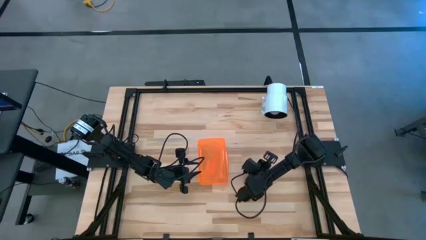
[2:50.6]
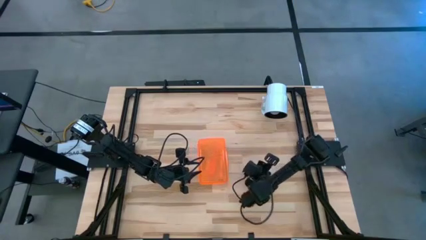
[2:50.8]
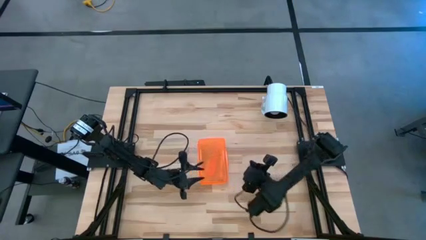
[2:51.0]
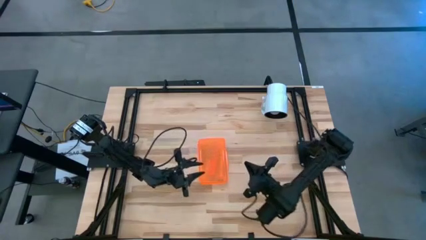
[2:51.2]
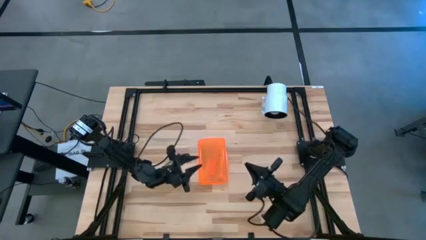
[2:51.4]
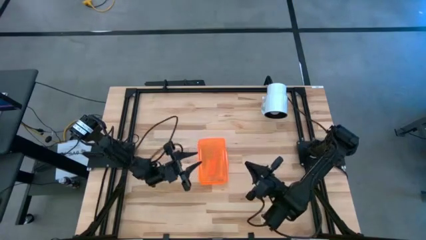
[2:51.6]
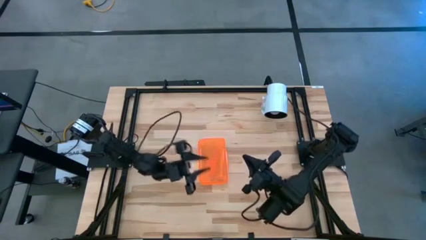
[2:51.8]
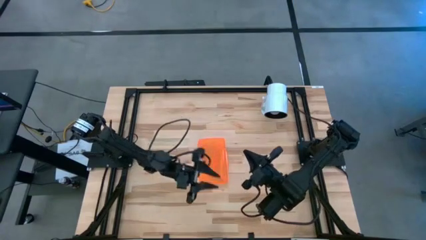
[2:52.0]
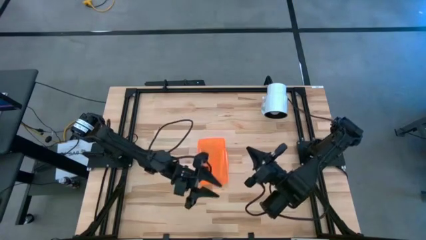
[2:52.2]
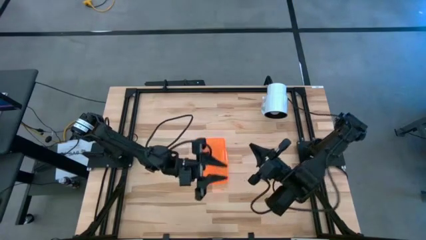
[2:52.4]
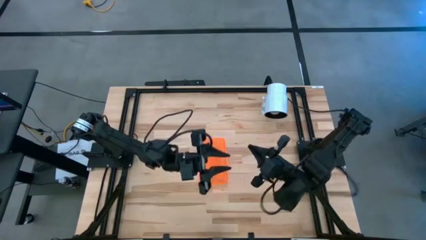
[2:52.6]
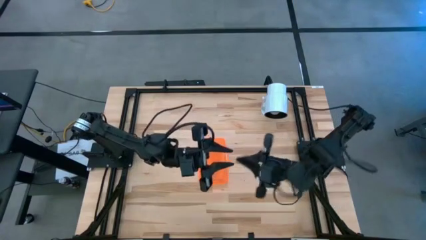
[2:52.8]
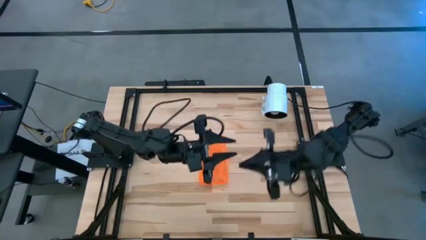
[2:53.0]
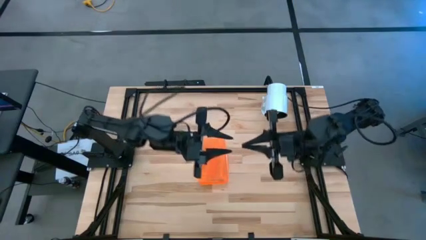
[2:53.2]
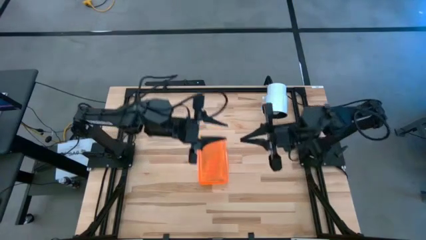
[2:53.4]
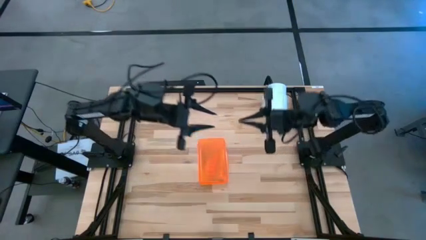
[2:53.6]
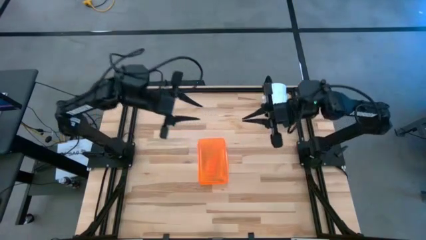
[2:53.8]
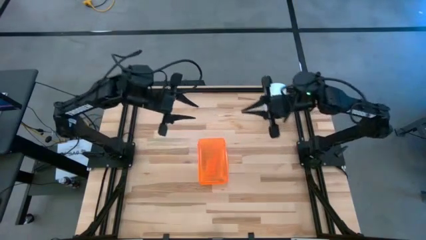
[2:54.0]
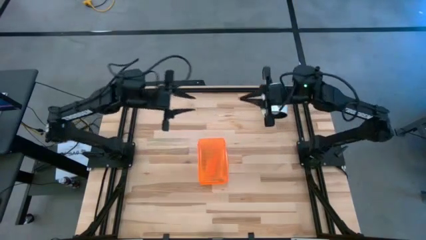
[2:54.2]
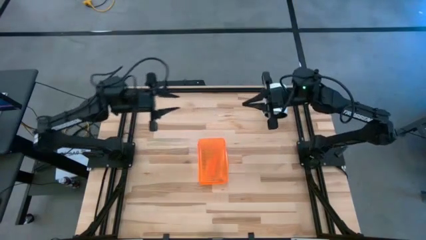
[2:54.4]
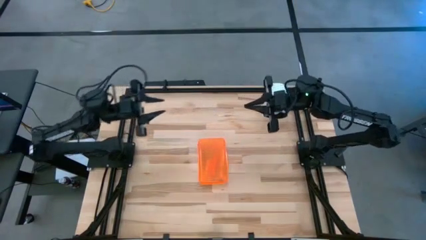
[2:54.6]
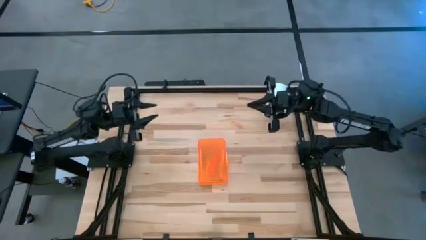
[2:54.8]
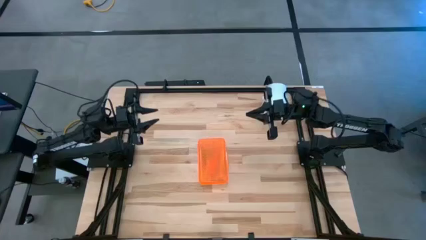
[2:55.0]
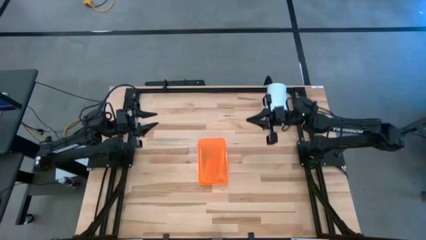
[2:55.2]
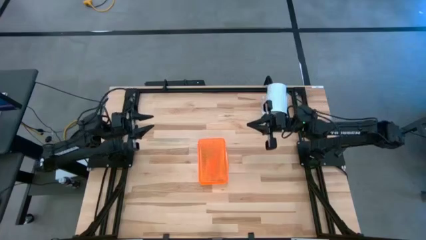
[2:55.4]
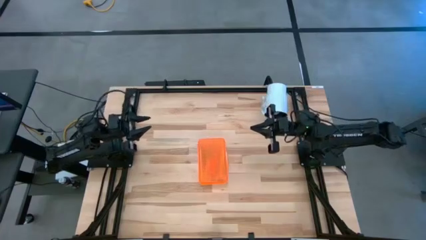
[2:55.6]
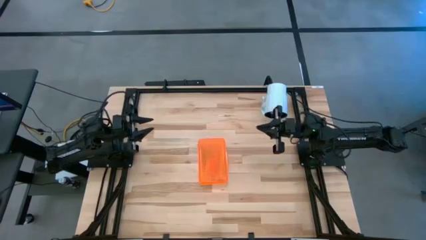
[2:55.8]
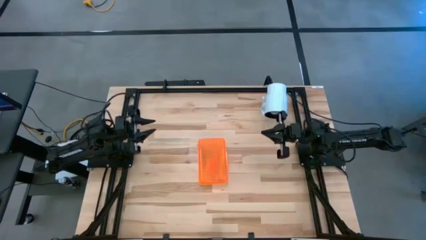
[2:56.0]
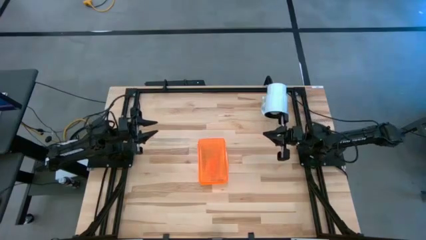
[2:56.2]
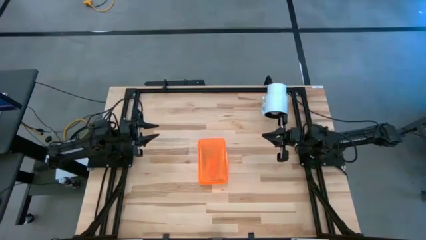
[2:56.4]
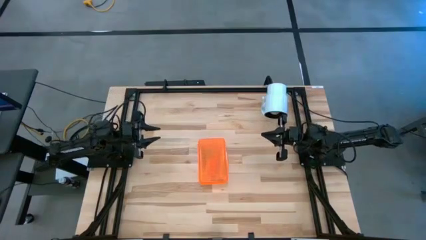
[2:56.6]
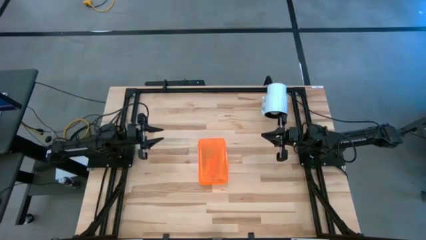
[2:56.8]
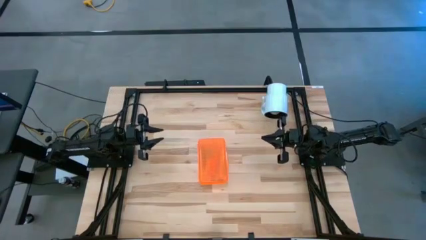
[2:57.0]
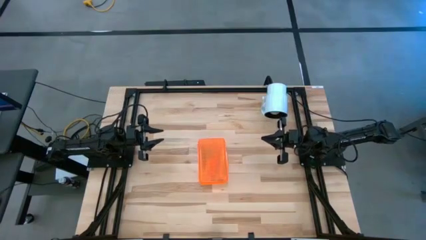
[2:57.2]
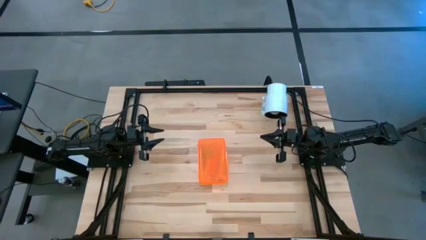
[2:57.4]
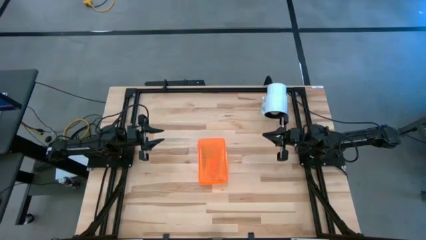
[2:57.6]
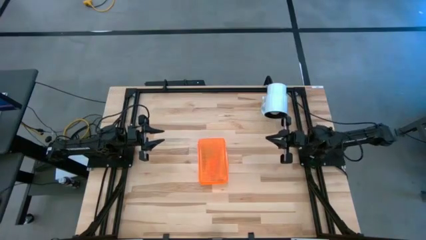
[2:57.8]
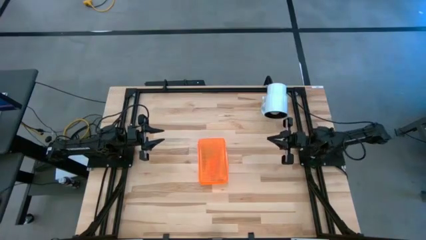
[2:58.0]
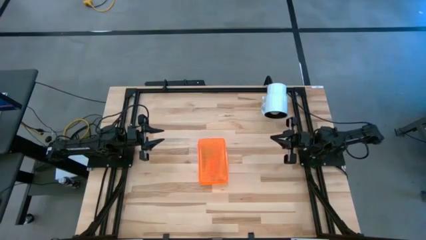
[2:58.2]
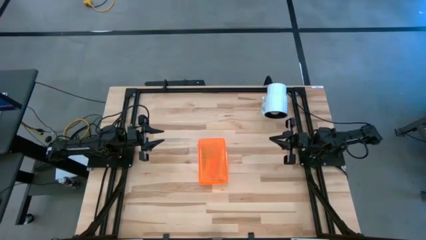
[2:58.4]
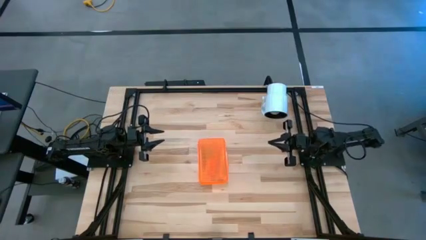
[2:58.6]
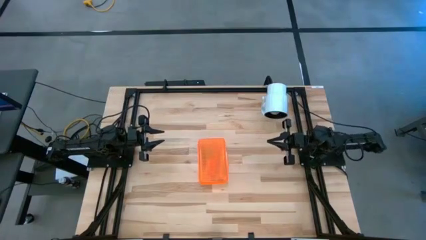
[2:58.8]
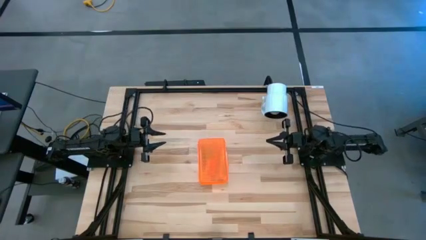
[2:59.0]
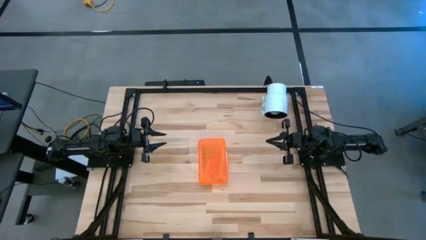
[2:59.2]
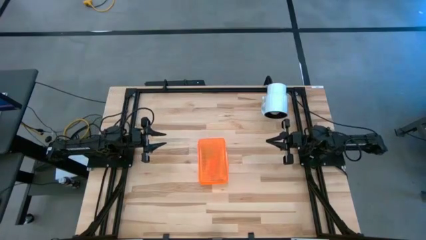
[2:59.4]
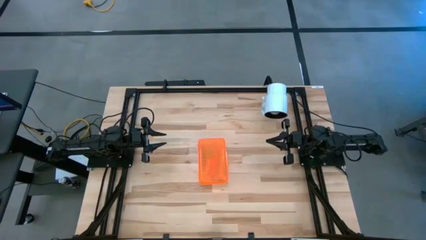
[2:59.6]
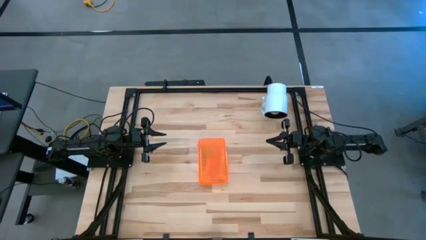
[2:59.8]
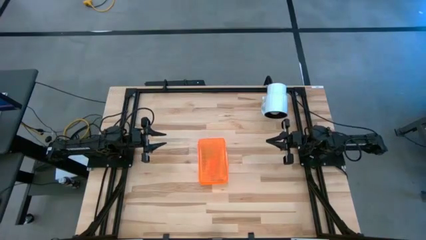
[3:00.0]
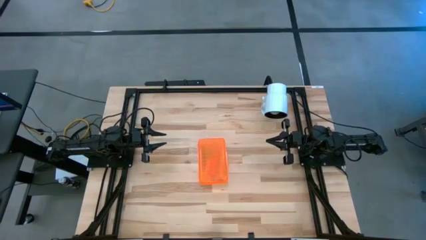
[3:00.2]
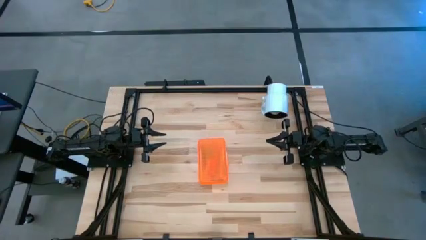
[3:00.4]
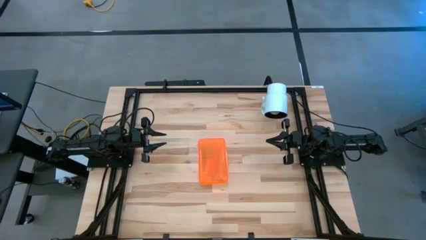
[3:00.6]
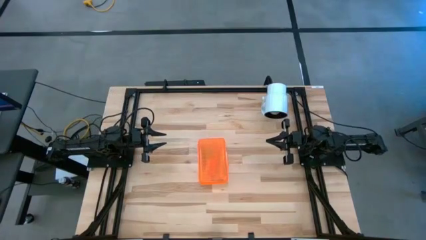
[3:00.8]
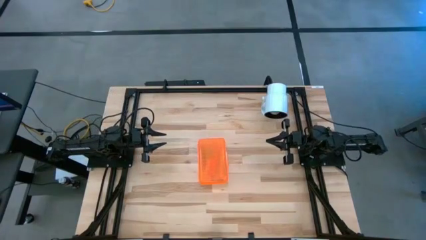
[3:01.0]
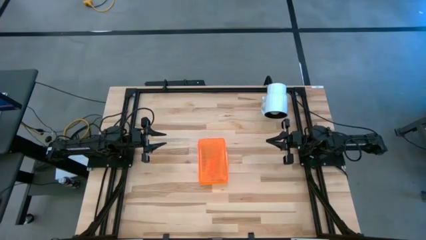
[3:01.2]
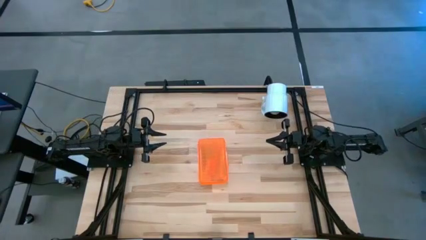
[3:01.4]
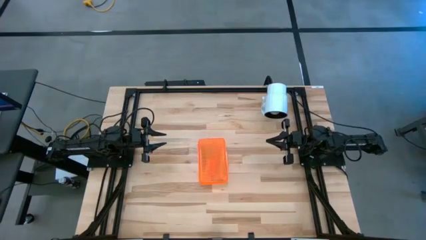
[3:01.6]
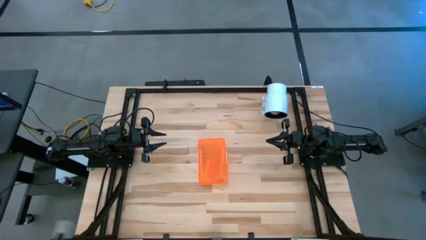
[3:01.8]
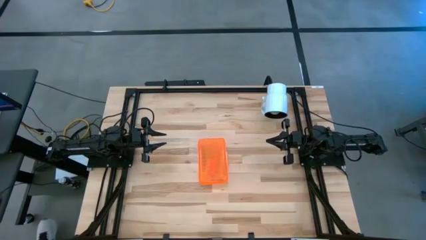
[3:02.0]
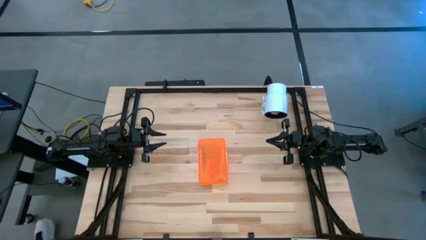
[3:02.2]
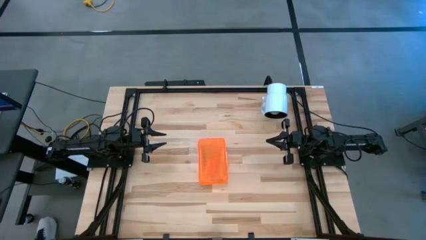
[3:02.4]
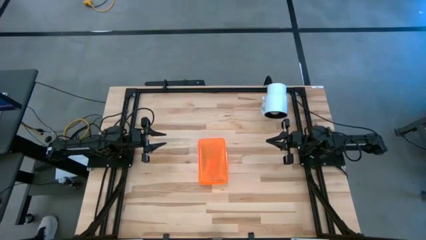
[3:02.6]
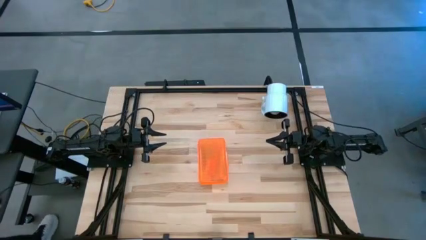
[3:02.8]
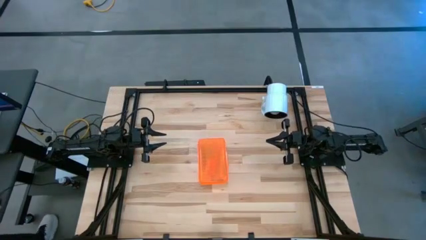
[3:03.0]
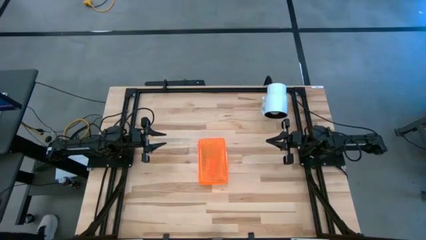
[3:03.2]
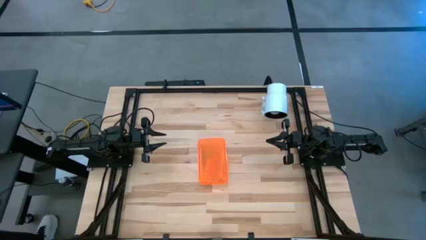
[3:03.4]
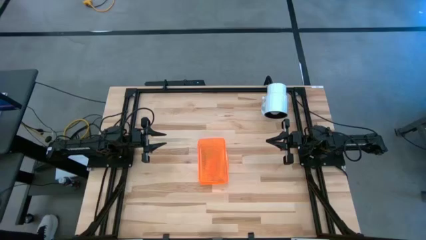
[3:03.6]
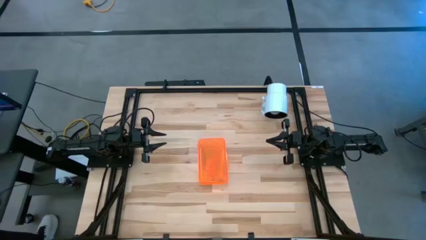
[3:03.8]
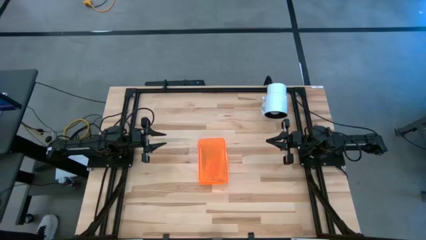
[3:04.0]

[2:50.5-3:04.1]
Task: Pick & place school supplies into a supply box
Return to Home Position

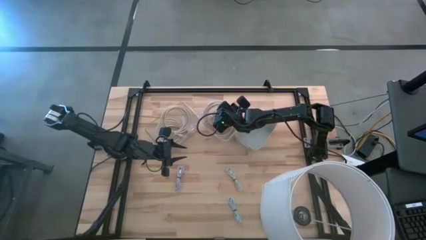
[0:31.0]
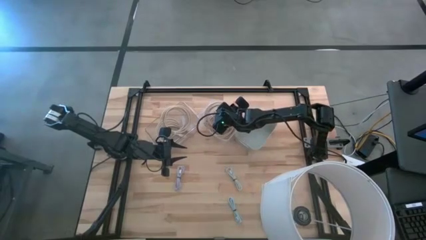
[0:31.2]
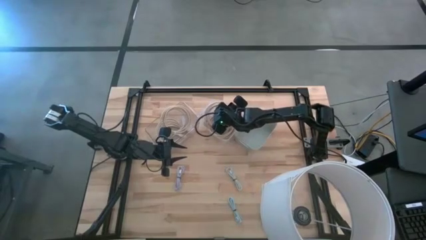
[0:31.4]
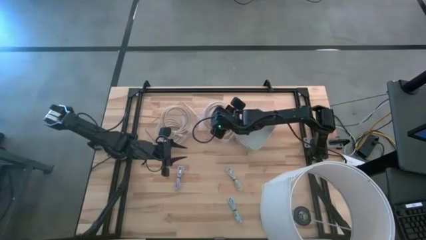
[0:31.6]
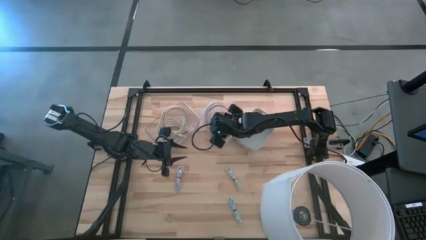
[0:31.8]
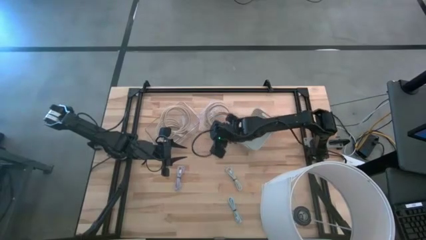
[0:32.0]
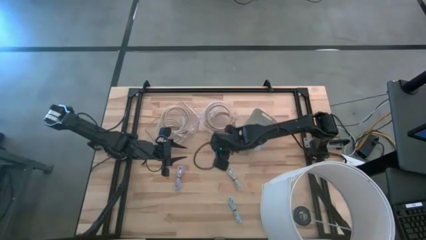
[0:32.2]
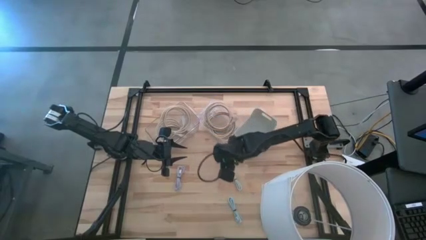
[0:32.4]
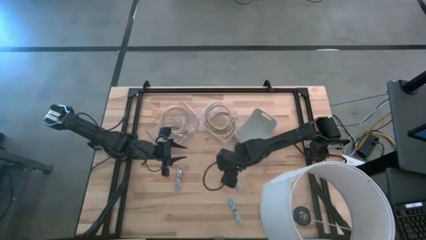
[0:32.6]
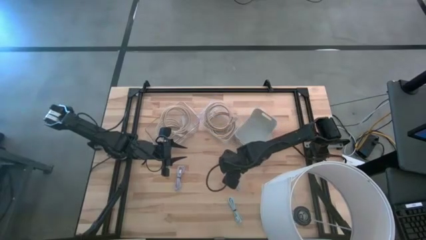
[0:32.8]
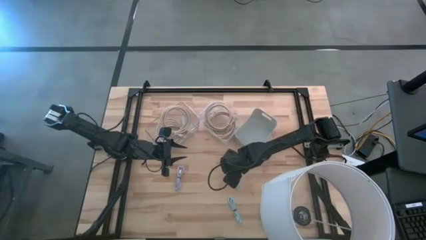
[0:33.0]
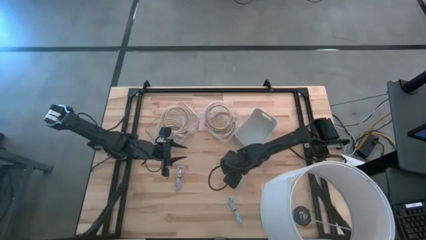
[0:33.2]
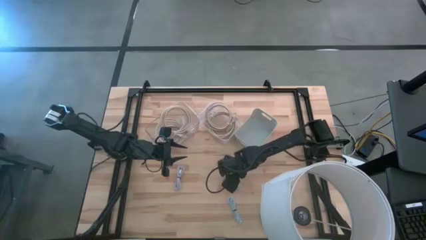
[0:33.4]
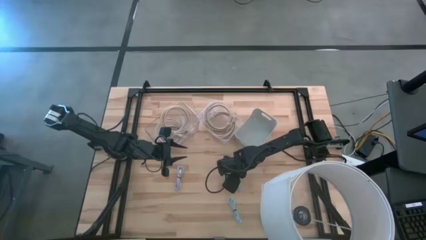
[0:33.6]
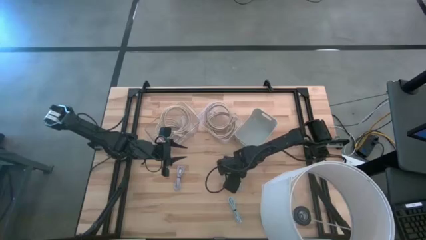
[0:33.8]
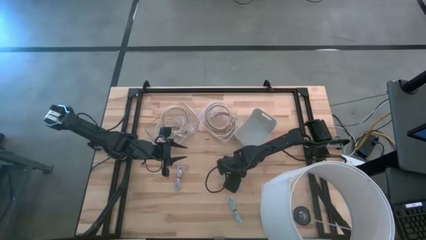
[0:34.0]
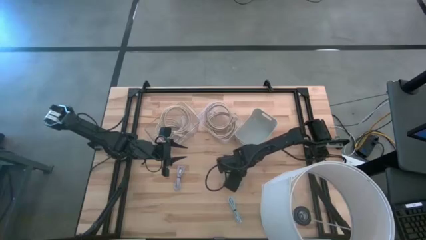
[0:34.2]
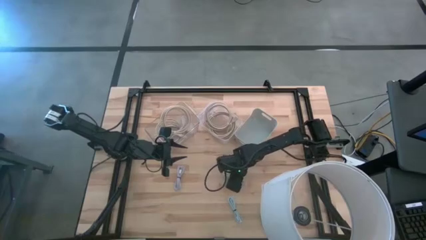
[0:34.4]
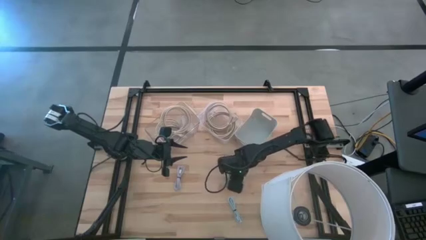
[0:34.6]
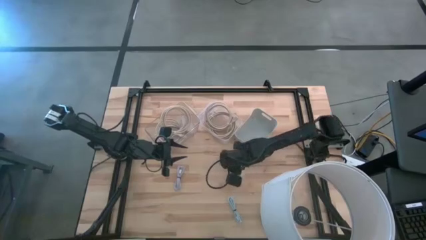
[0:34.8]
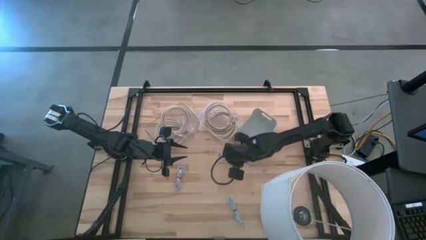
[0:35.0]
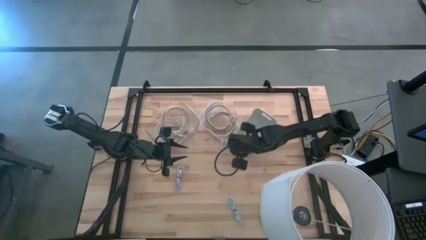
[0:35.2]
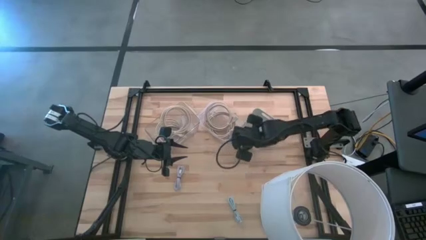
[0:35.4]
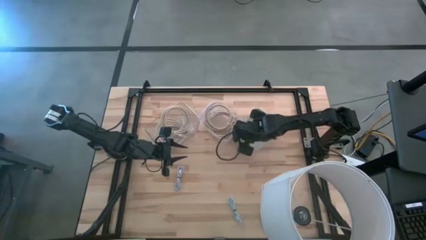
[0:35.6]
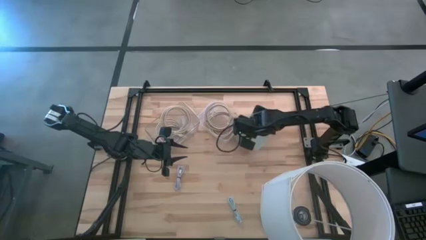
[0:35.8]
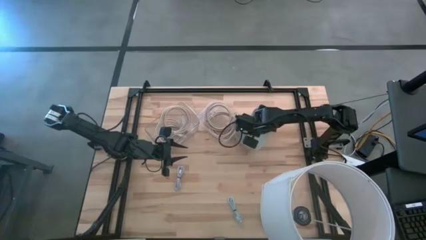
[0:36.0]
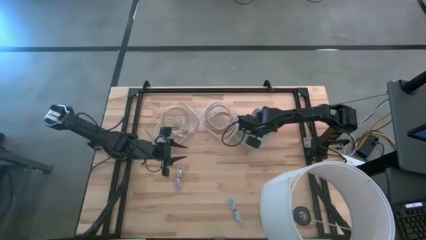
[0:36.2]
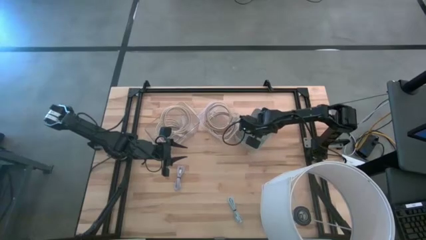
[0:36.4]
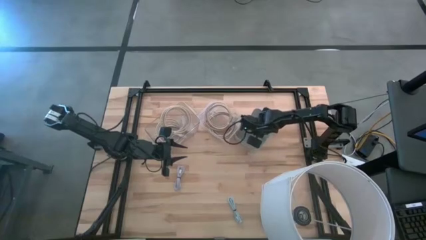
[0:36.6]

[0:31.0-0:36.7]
Task: Pick & Place USB Port
Put the white charger cable into the white bin
